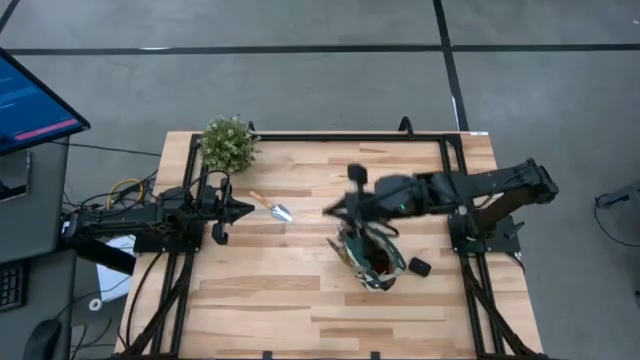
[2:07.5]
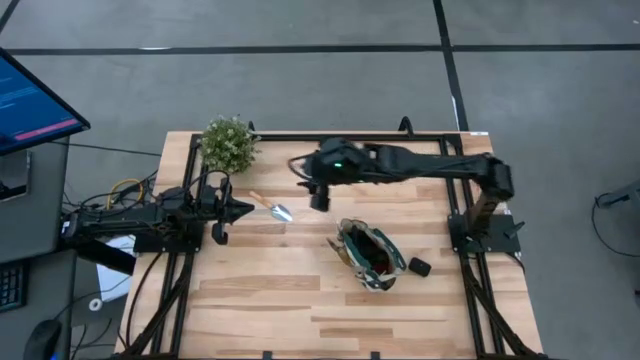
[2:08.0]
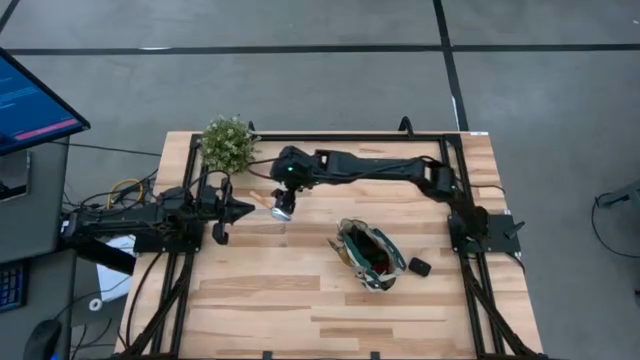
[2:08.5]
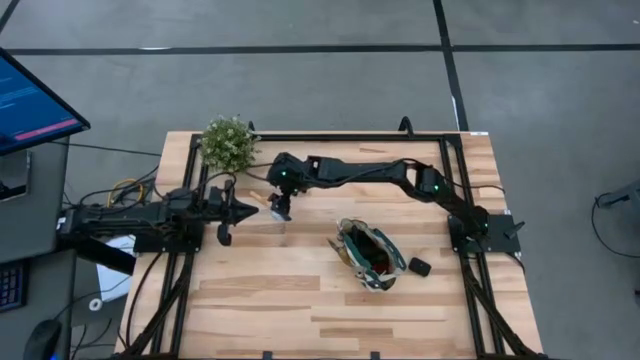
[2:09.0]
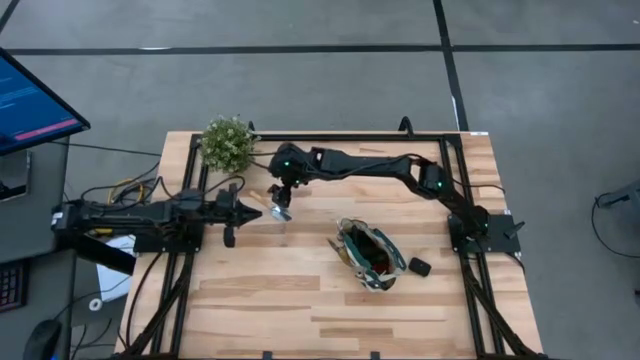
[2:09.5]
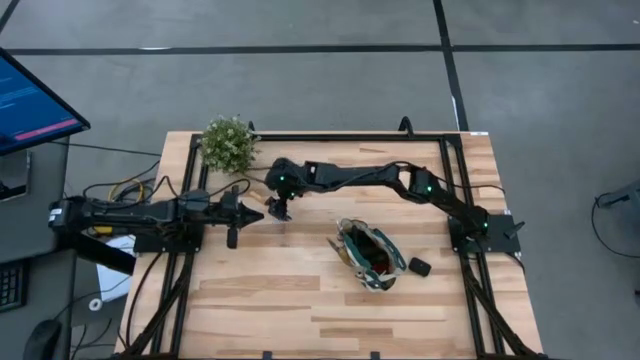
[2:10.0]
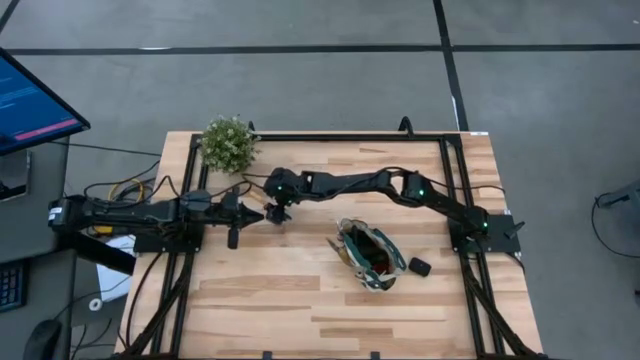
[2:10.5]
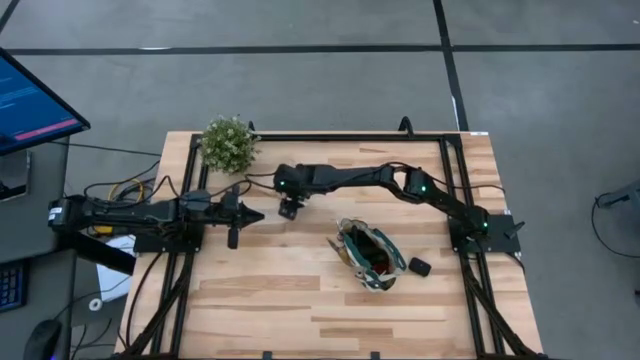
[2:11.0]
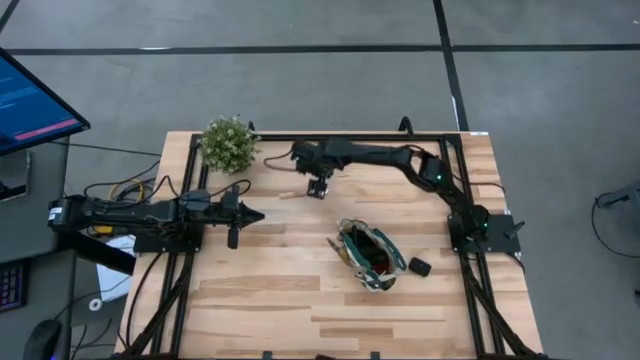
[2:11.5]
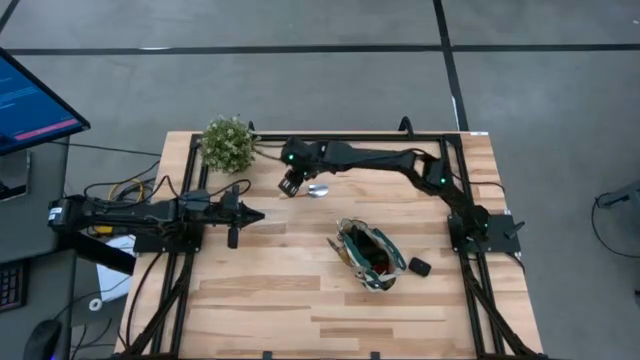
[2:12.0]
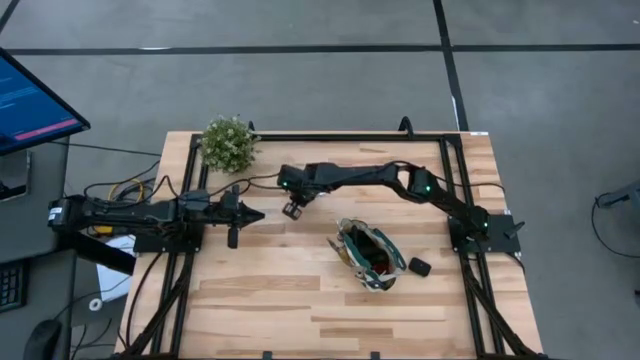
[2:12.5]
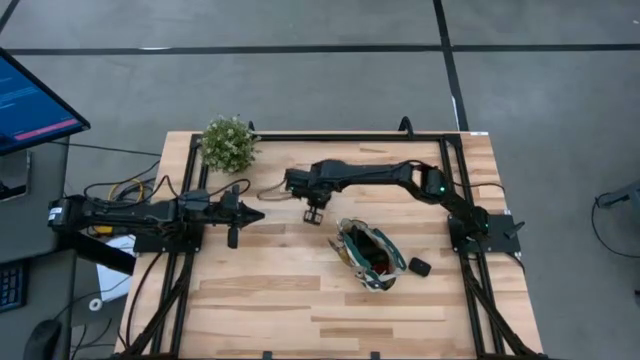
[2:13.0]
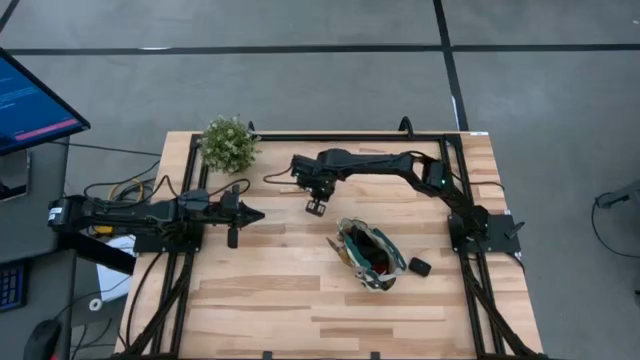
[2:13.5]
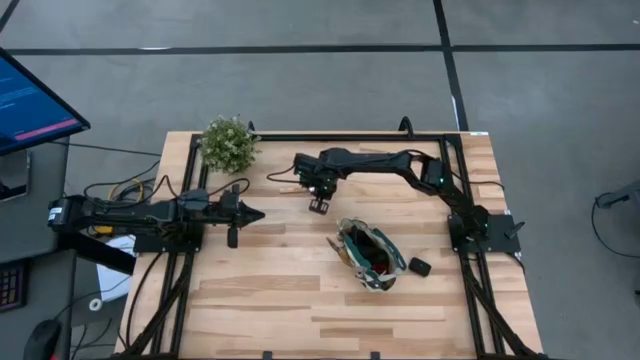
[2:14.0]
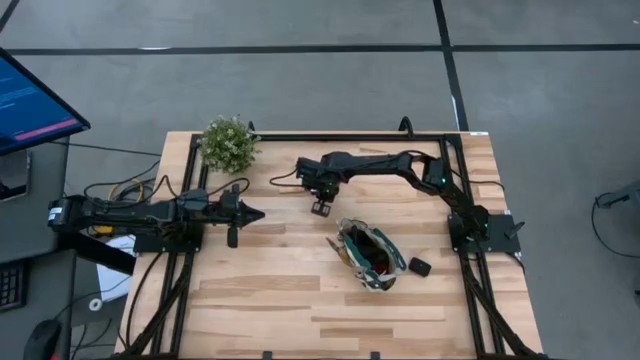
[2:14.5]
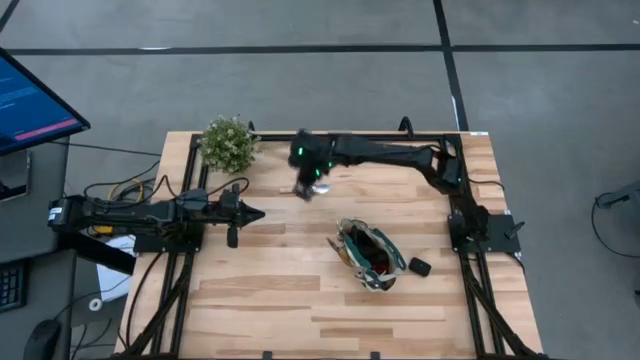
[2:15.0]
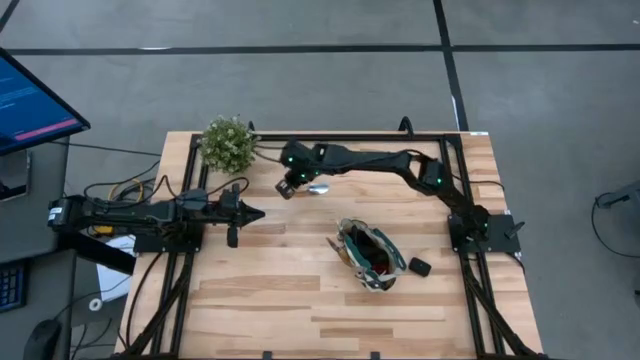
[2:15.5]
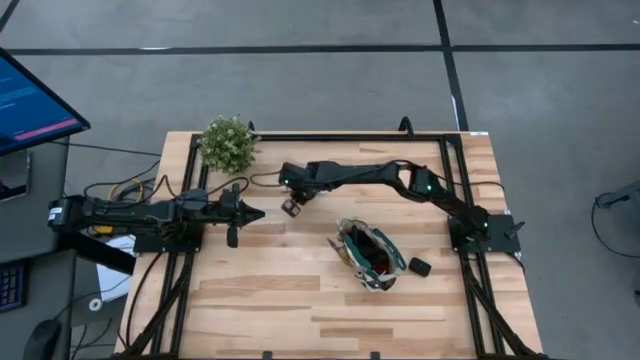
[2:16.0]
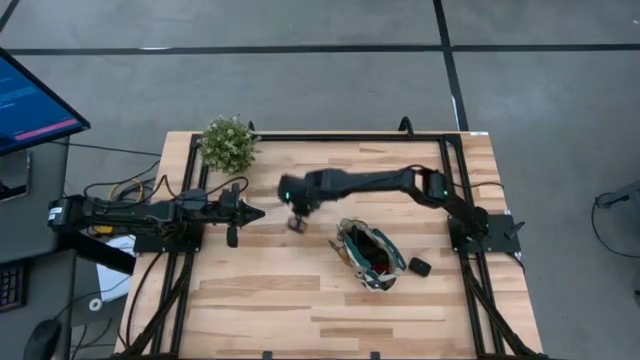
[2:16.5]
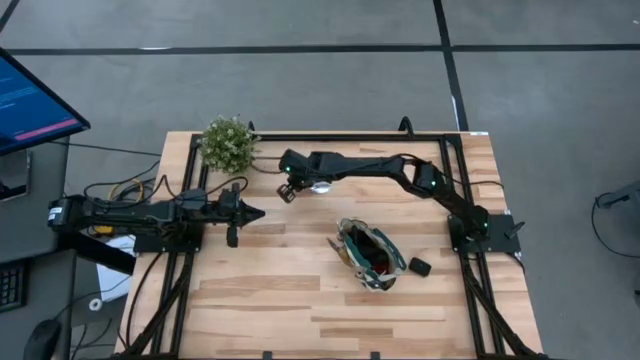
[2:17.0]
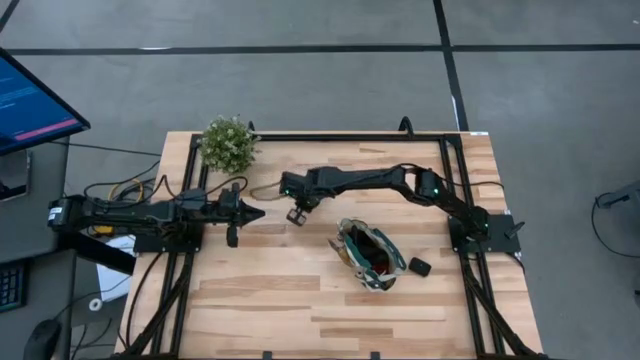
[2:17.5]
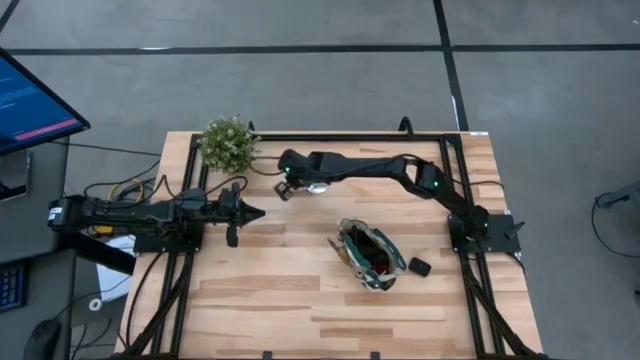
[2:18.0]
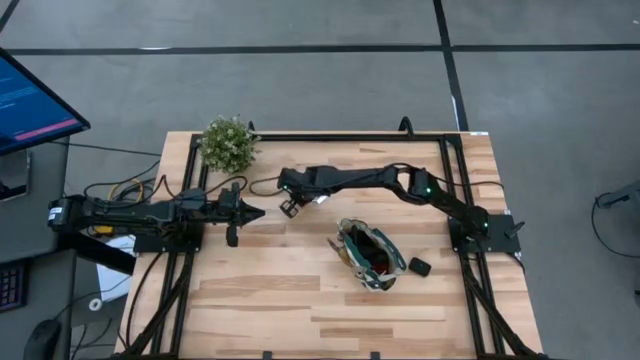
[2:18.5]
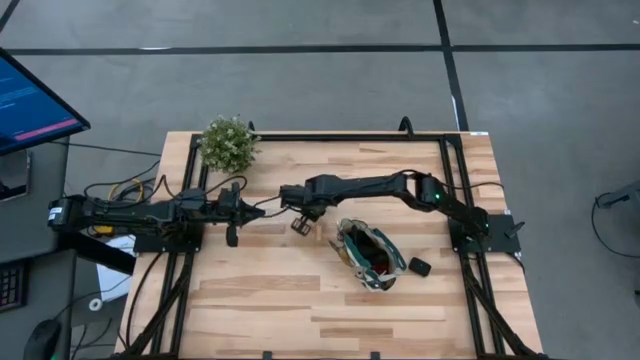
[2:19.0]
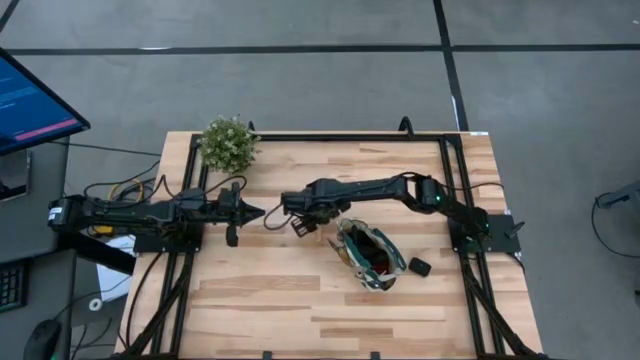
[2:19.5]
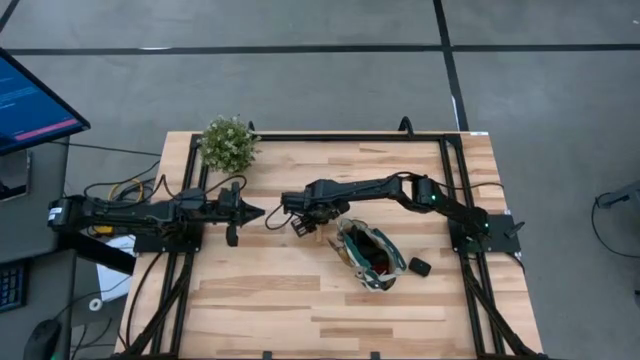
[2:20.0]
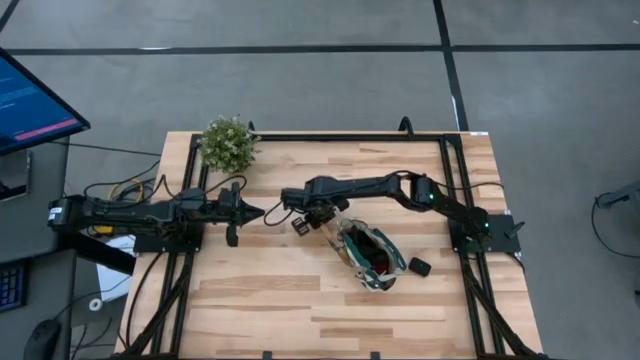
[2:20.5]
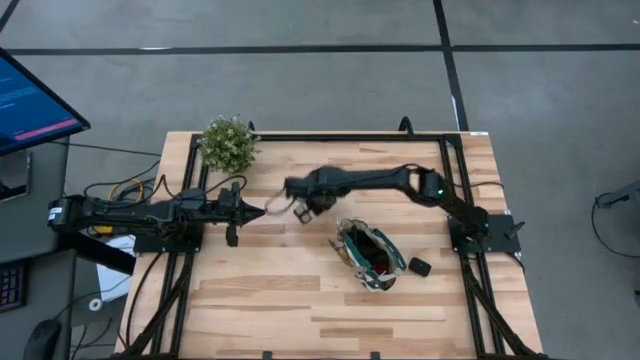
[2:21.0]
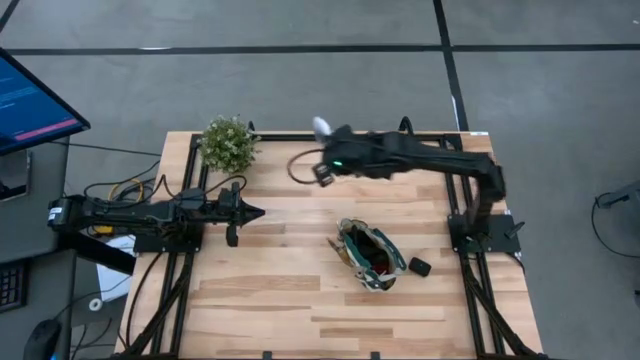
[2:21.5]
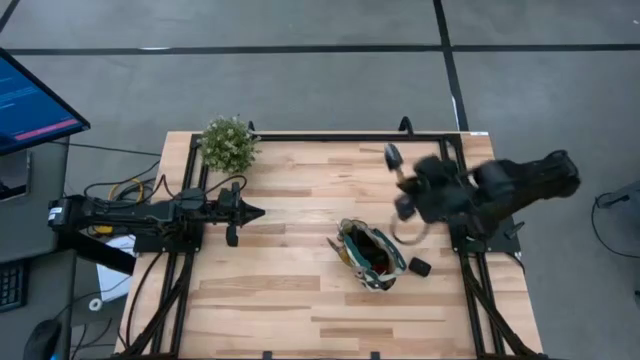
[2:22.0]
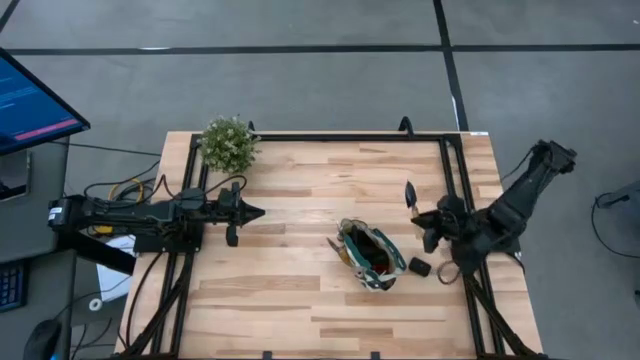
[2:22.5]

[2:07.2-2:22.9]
Task: Pick & Place Garden tools in Gardening bag
Put the brown trowel into the gardening bag

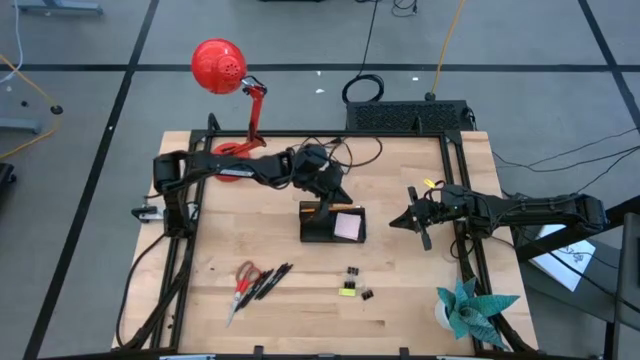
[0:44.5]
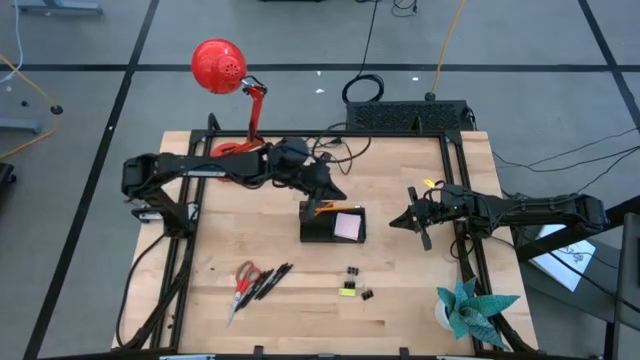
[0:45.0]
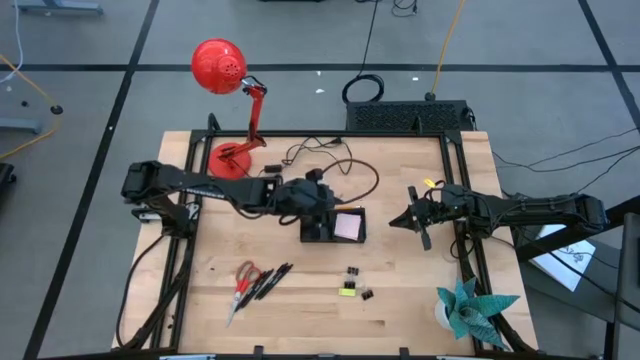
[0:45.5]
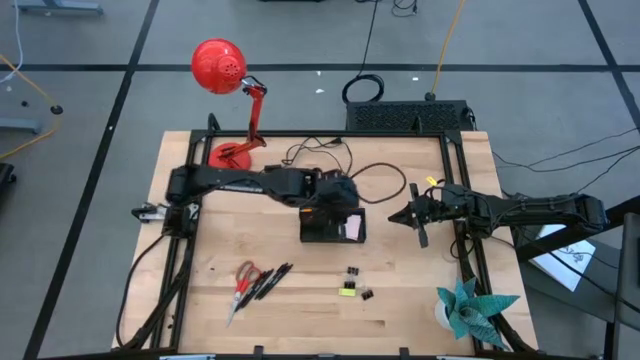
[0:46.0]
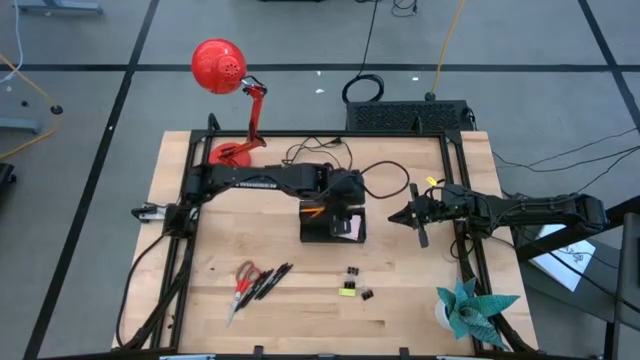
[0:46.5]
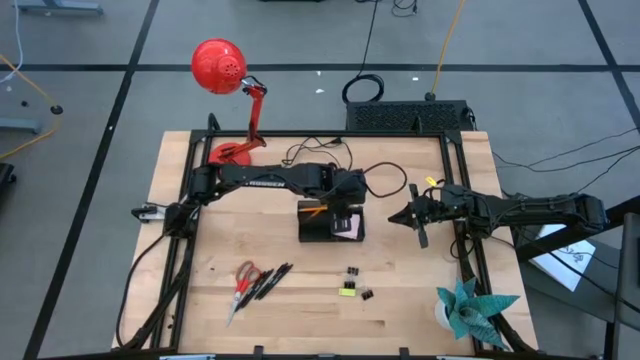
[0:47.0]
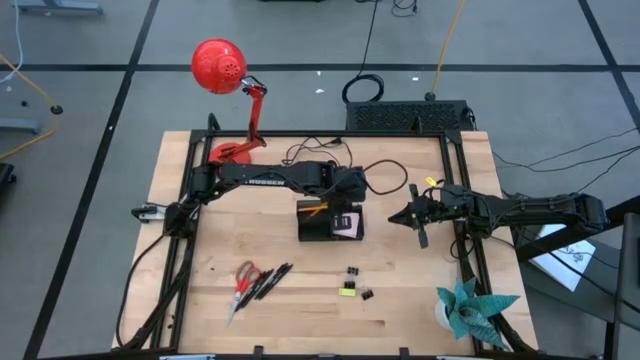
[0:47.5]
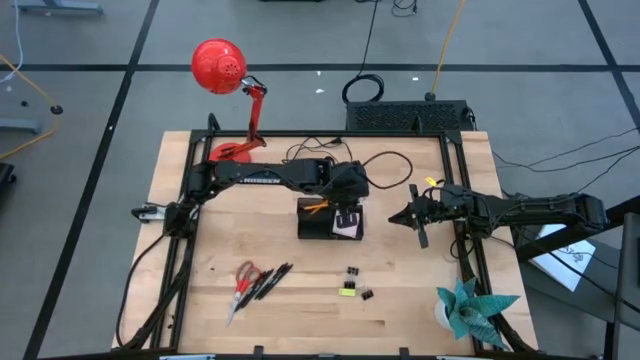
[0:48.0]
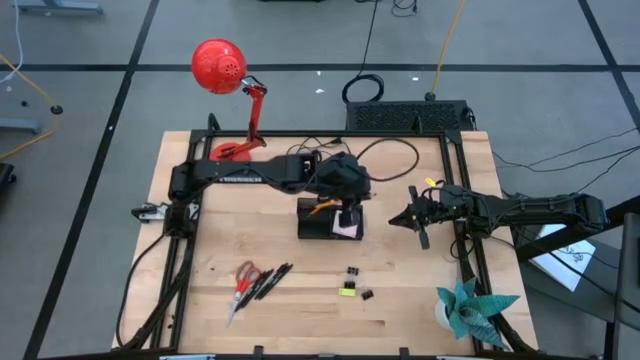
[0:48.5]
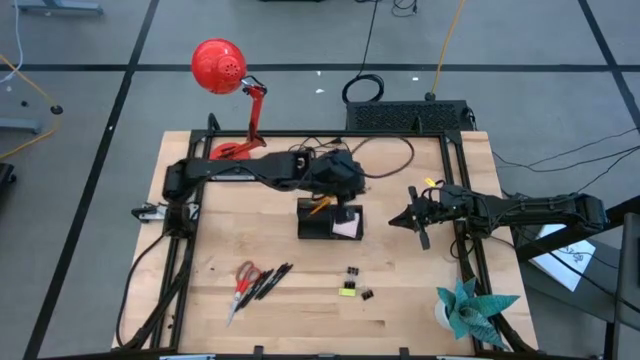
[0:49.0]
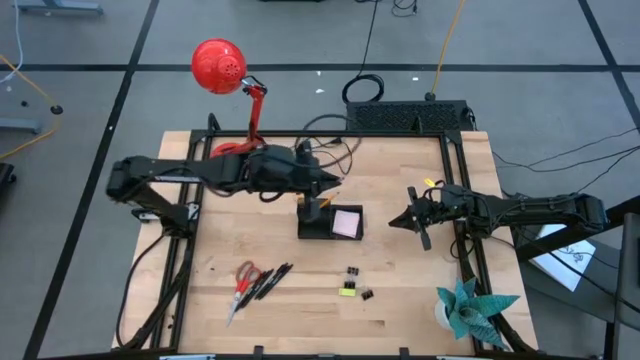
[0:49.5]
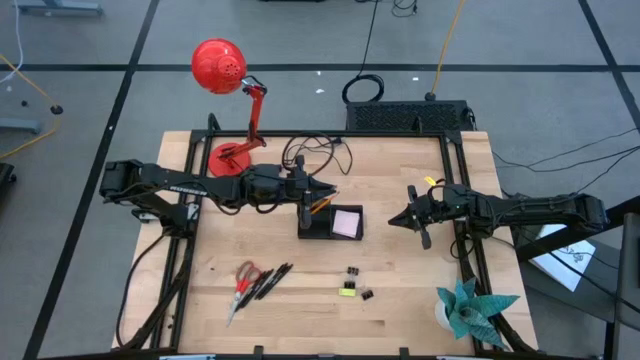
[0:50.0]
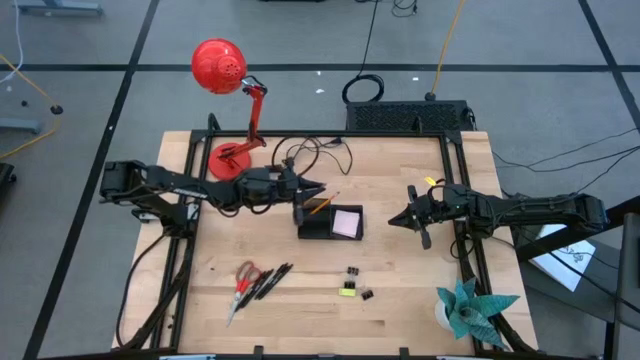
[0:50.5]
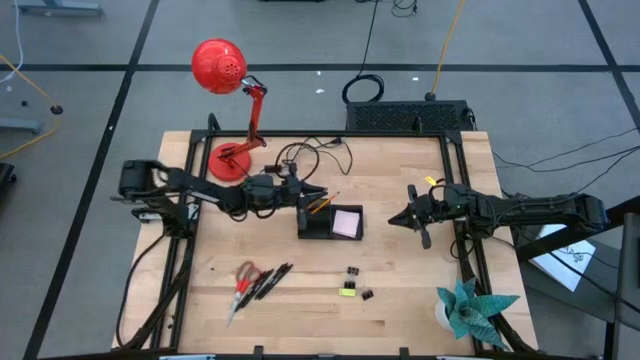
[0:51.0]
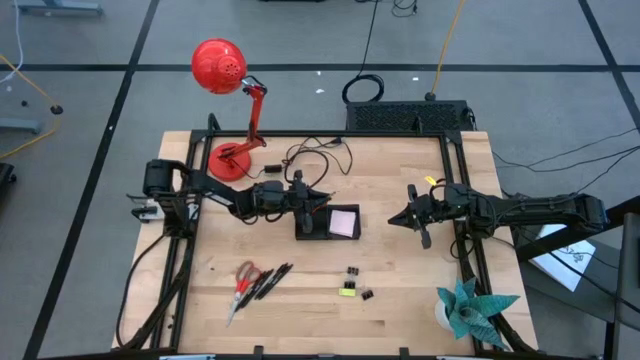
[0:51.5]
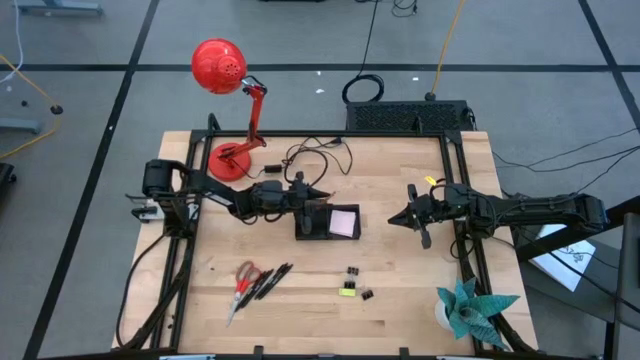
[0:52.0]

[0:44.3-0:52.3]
Task: Pick and place office supplies into organizer
Put the pencil into the desk organizer
